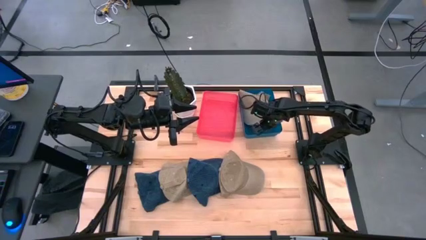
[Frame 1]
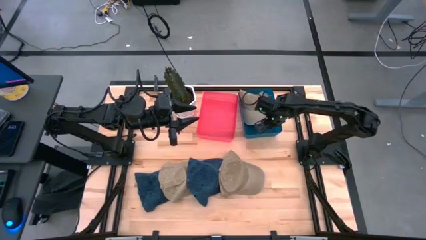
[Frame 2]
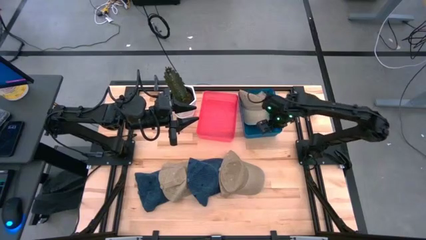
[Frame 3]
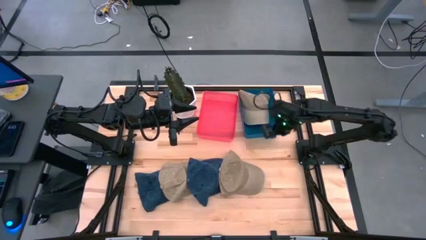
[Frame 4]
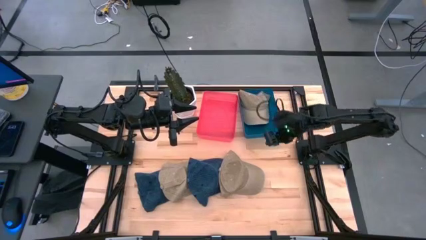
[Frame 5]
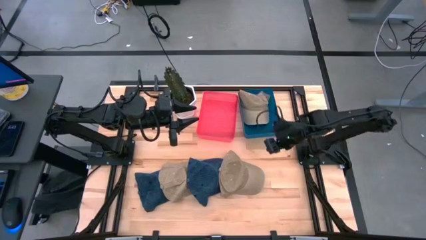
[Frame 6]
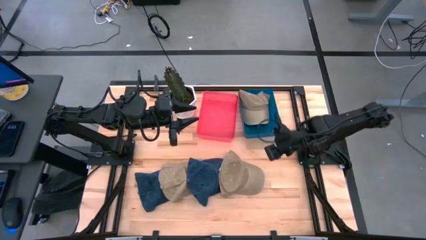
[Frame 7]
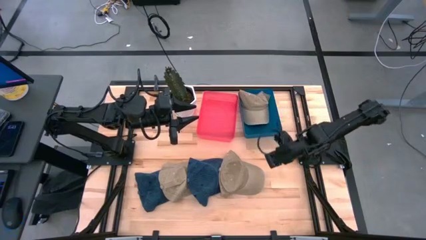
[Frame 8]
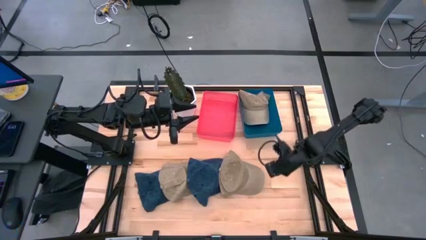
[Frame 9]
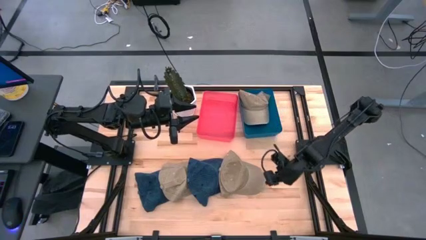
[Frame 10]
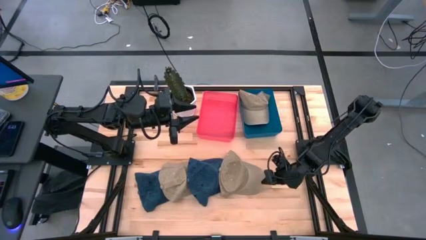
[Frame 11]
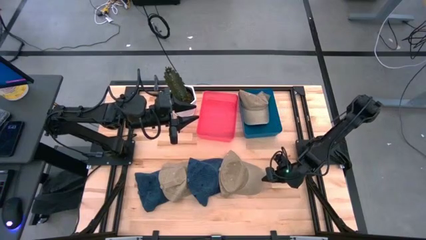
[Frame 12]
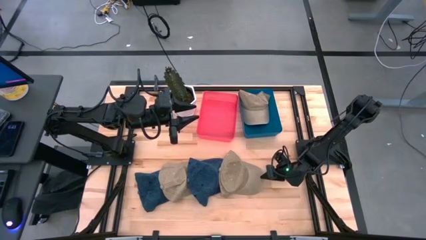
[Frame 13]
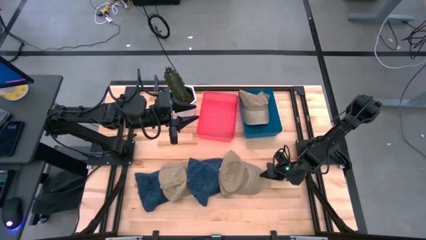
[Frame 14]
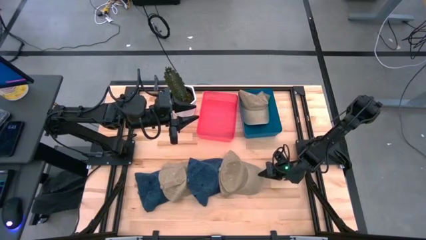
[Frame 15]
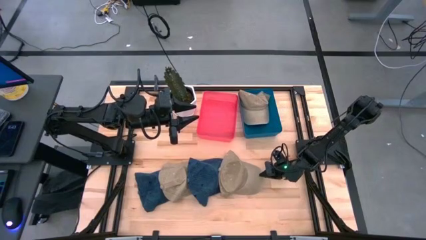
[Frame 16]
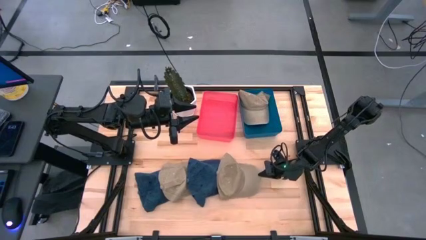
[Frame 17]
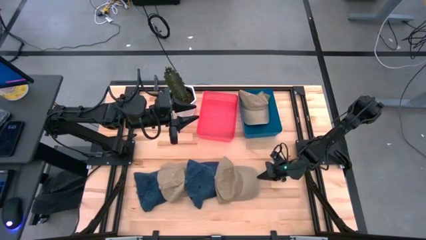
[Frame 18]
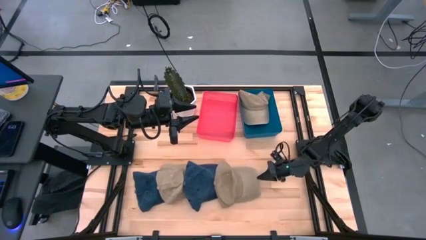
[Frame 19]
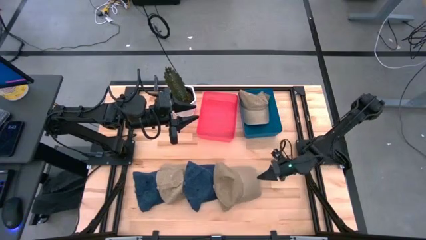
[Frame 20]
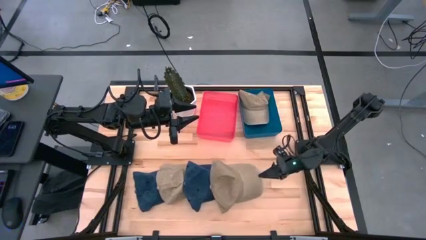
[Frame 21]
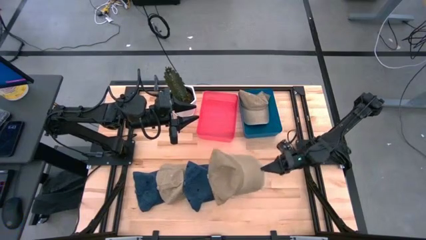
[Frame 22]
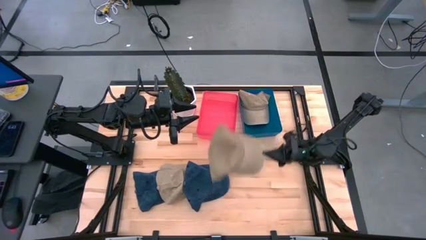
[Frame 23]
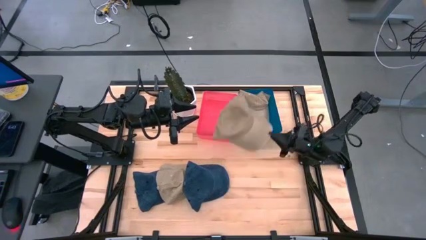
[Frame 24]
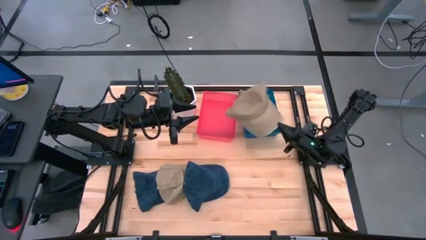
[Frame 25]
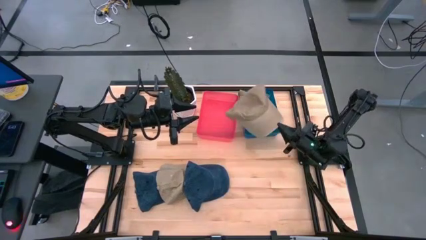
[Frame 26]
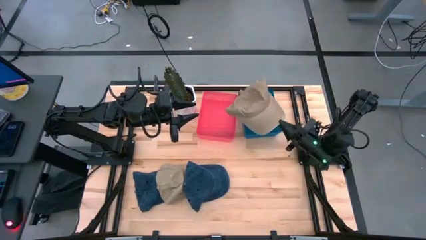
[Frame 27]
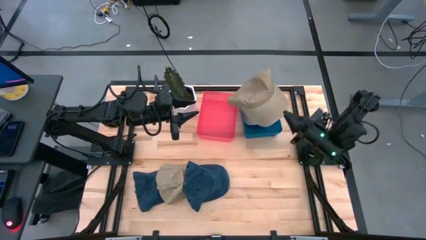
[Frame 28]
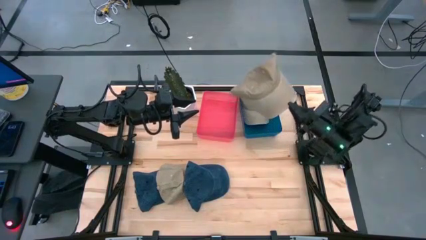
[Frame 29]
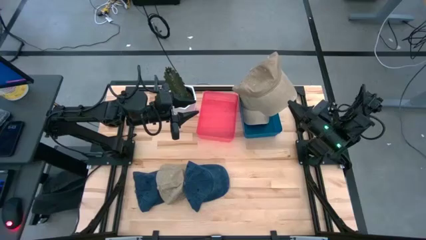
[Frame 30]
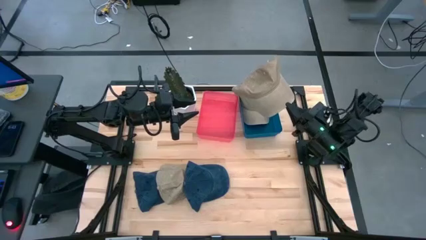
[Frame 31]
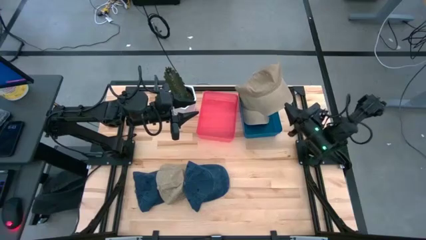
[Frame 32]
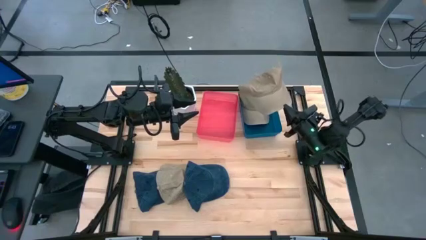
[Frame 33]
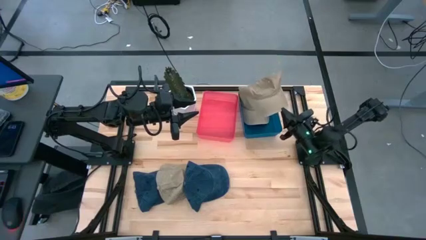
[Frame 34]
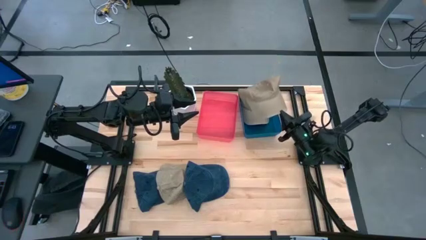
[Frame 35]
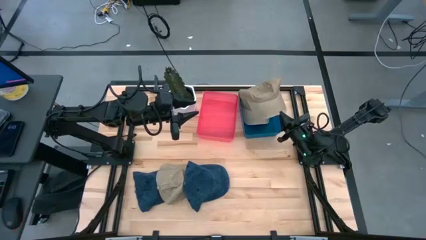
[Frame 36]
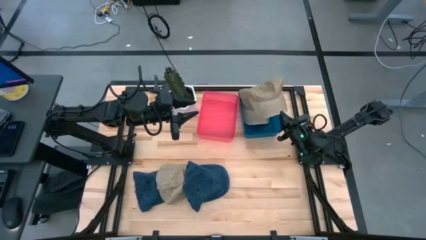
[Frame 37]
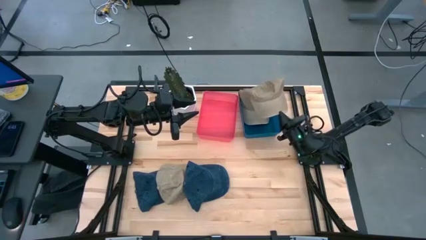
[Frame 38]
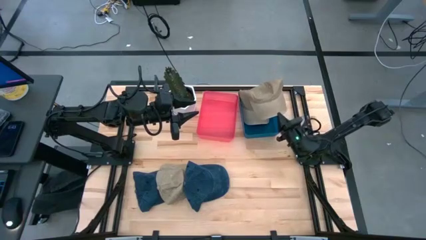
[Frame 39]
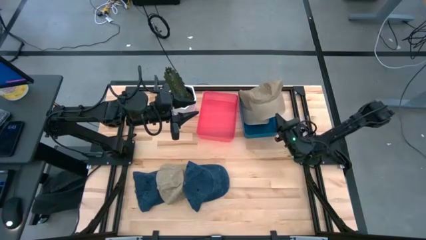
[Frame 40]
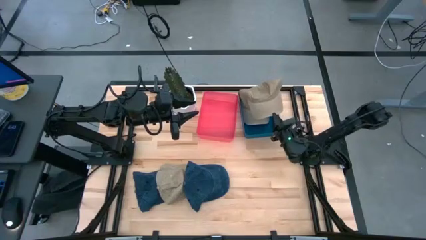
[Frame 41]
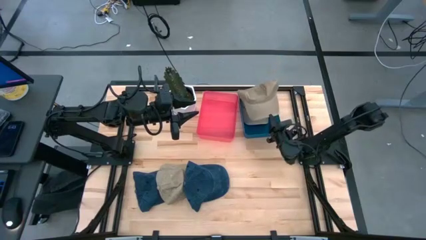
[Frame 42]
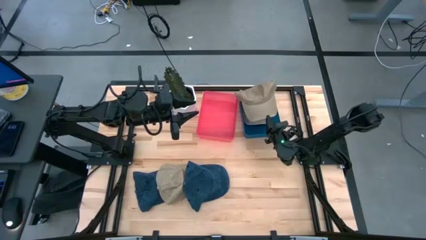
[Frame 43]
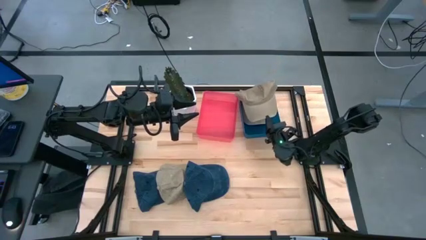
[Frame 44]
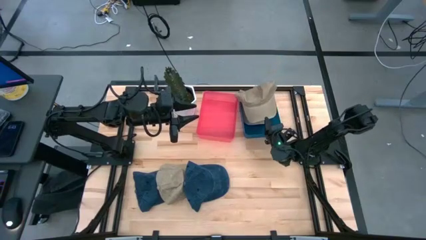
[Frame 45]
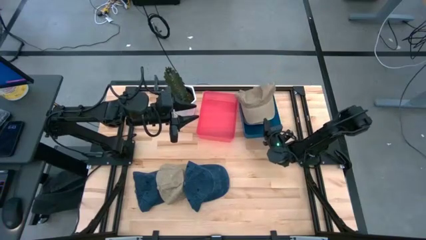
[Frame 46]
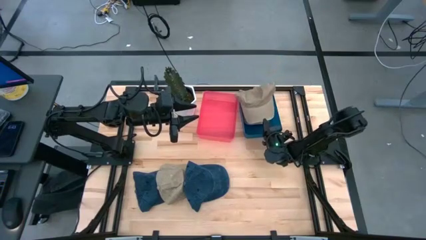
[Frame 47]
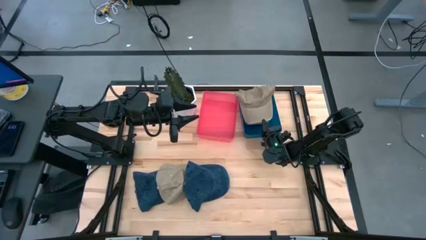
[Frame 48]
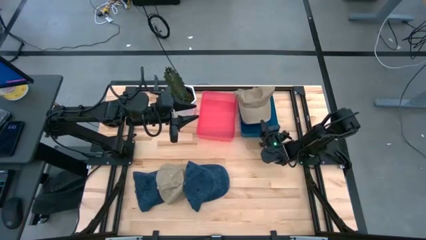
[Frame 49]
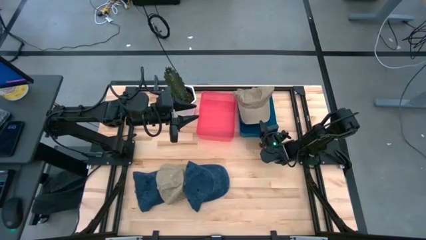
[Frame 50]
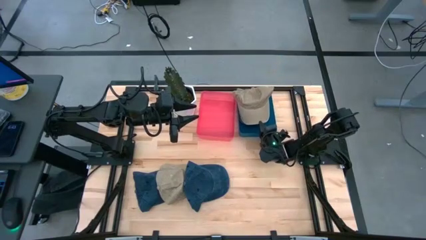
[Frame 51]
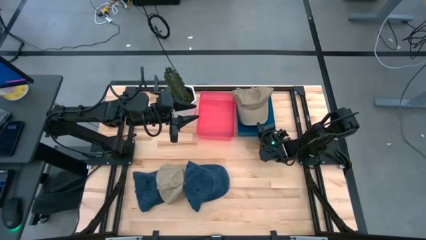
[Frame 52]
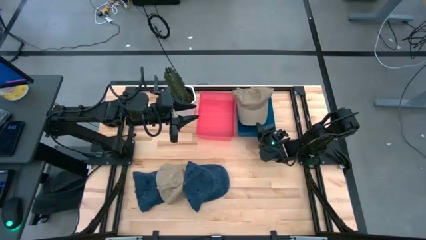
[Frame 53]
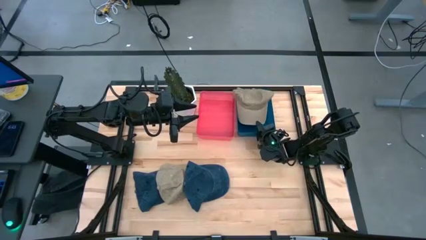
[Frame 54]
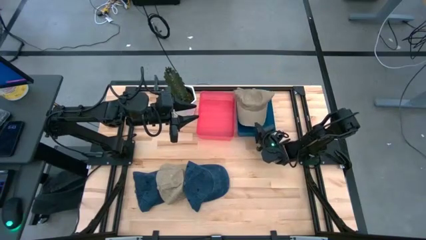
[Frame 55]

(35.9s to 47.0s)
Task: Pick & Place hat
Put the right brown cap into the blue bin

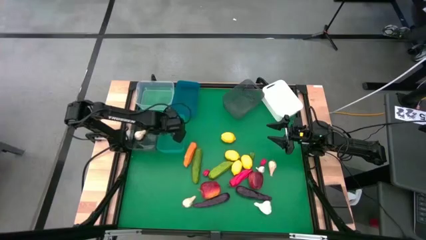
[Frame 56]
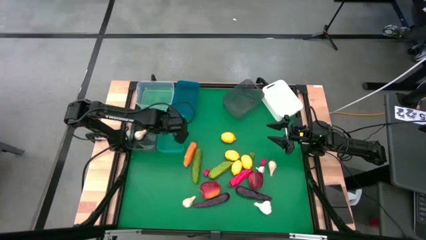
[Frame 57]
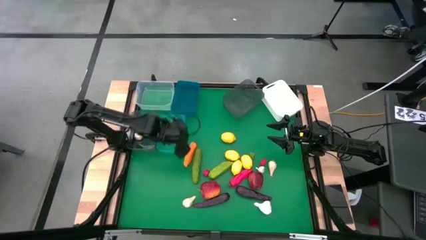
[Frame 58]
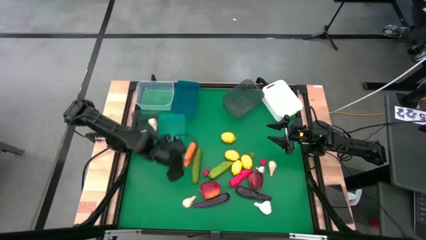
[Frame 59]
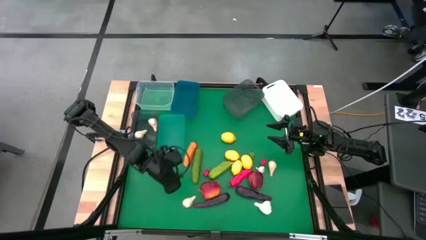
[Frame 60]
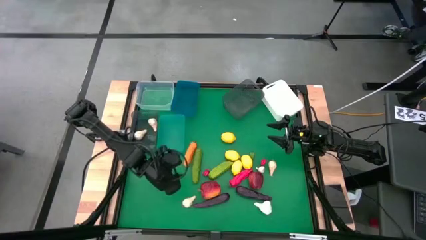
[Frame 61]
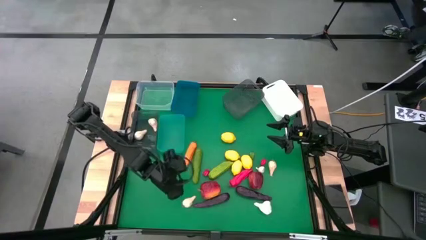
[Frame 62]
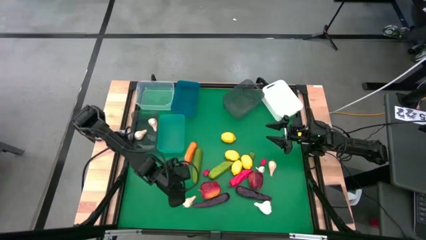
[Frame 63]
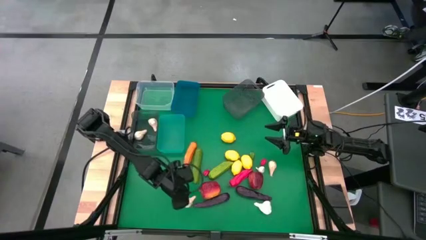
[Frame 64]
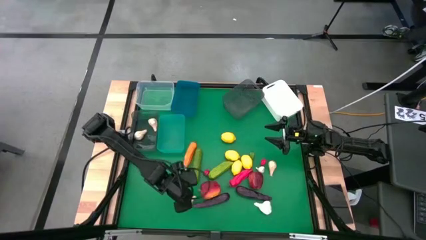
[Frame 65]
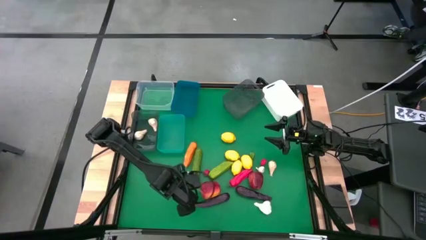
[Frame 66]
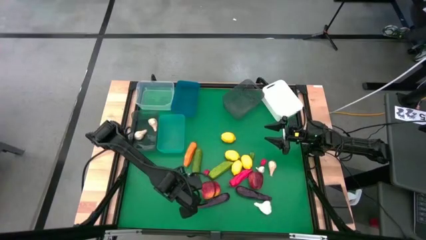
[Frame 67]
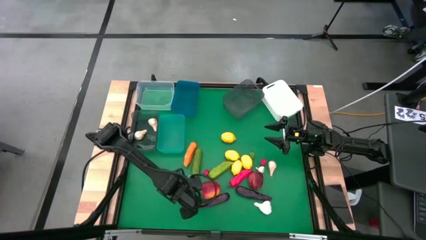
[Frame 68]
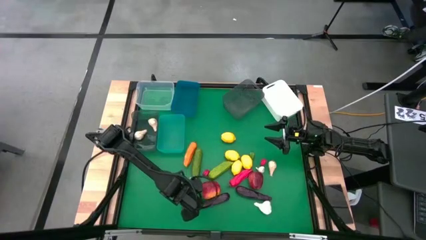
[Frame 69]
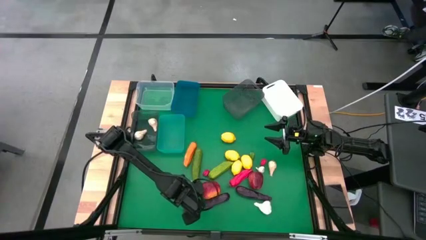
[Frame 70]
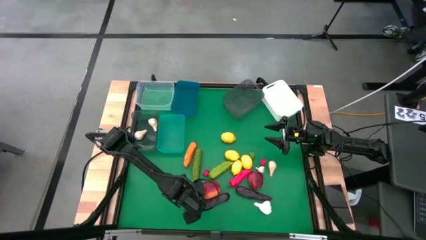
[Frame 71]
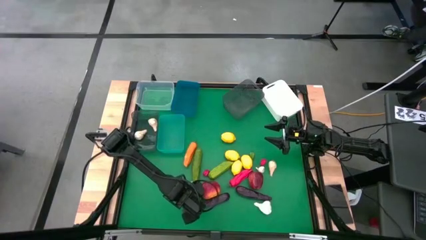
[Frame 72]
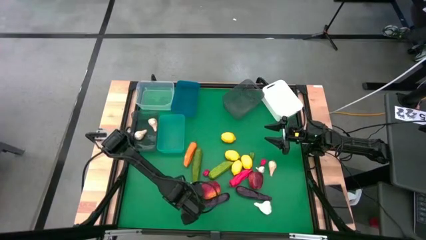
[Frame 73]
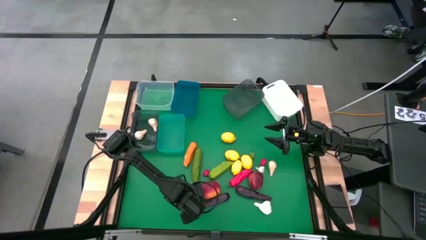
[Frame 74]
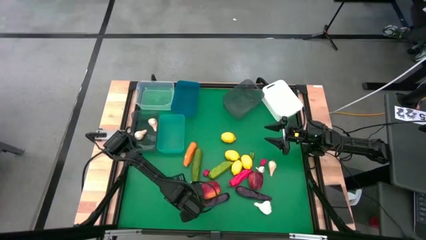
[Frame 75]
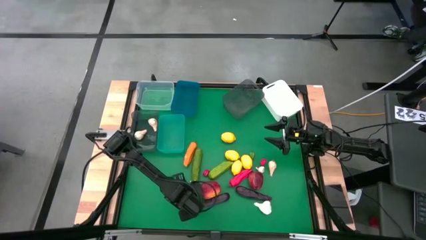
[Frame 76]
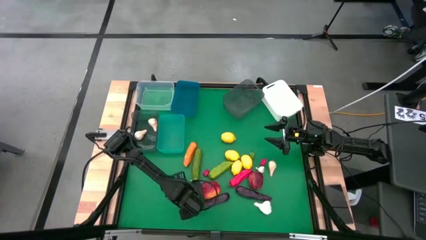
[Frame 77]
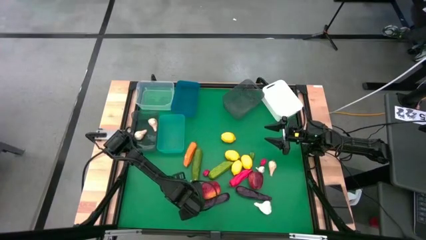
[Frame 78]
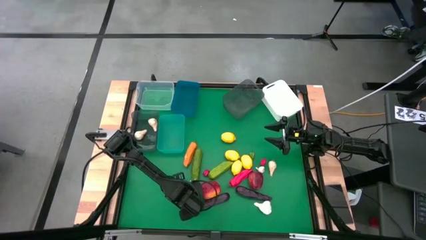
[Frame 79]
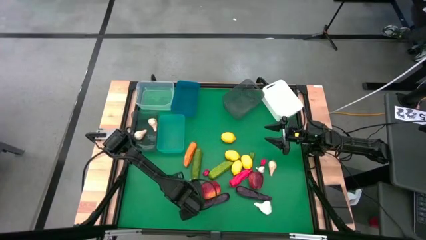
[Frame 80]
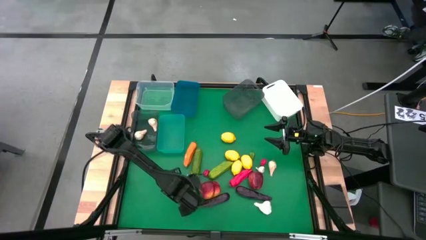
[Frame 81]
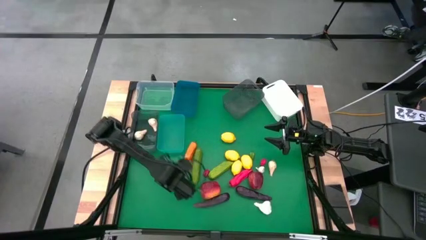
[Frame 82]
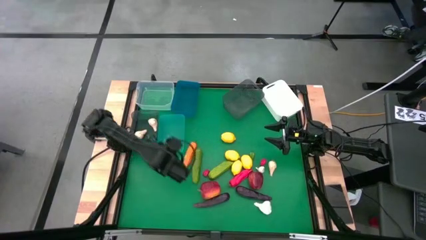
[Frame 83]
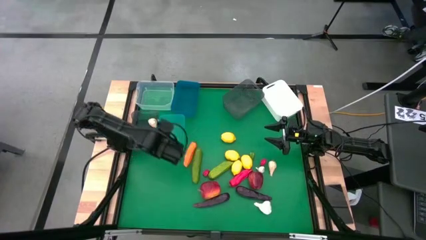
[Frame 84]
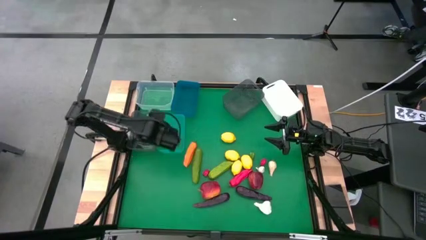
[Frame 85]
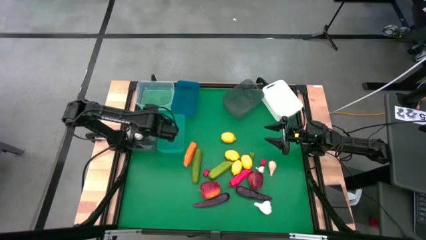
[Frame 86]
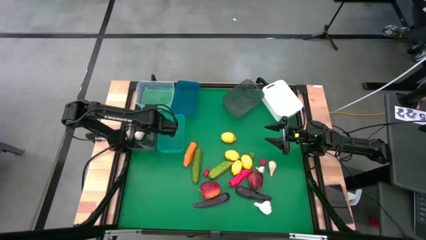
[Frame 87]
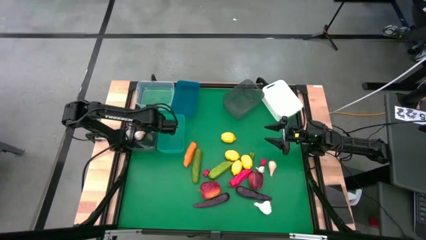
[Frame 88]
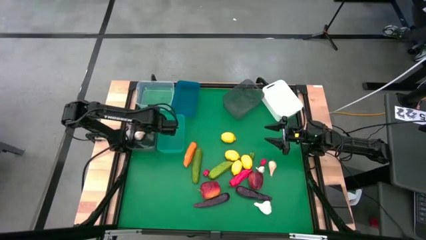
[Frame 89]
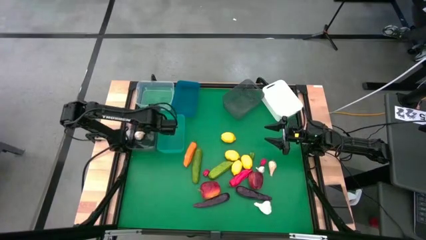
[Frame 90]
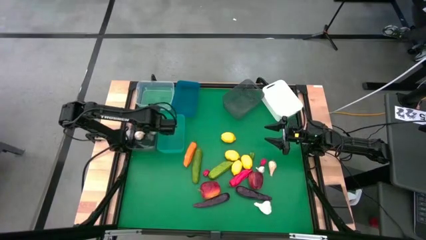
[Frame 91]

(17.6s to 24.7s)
Task: Sort produce into baskets
Put the white garlic into the left black bin
